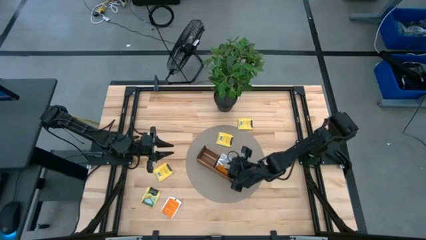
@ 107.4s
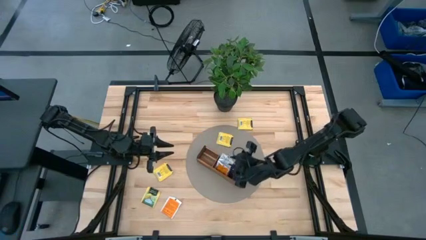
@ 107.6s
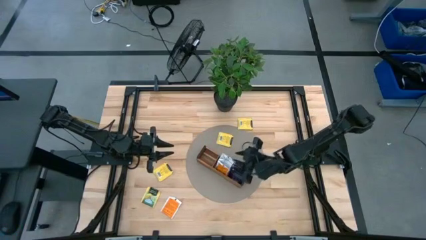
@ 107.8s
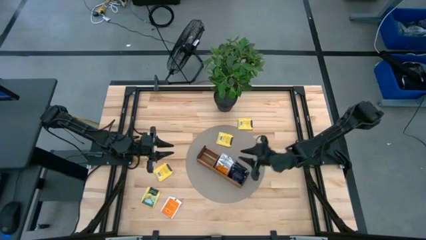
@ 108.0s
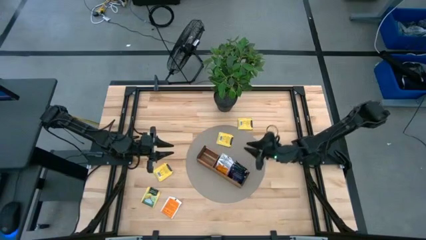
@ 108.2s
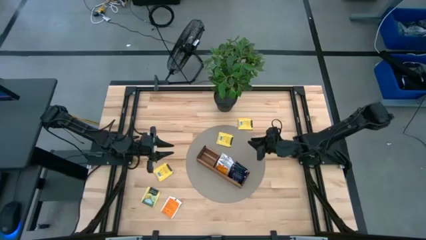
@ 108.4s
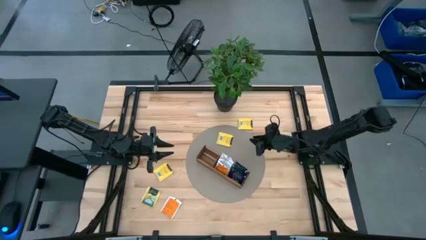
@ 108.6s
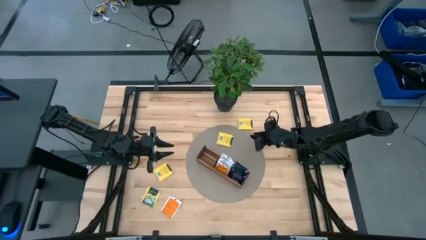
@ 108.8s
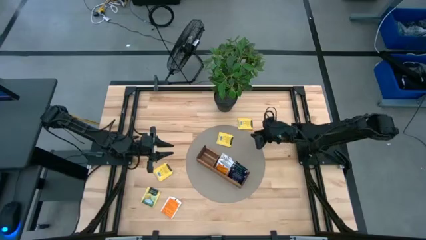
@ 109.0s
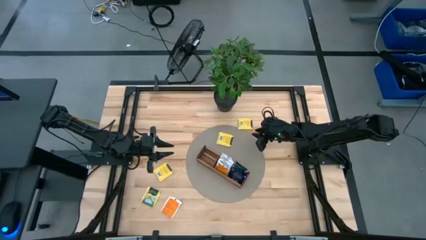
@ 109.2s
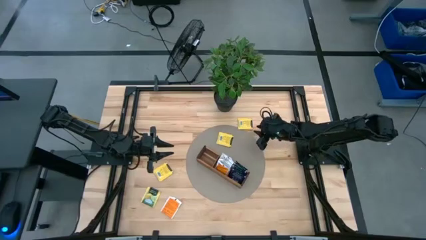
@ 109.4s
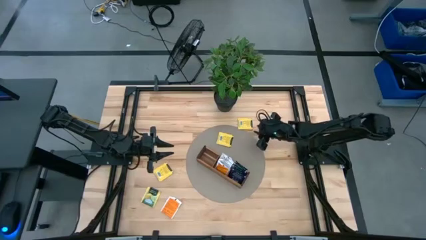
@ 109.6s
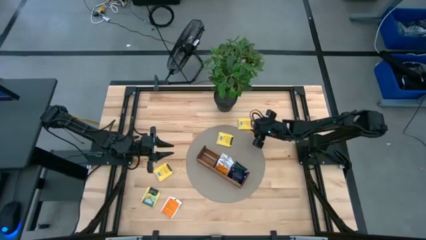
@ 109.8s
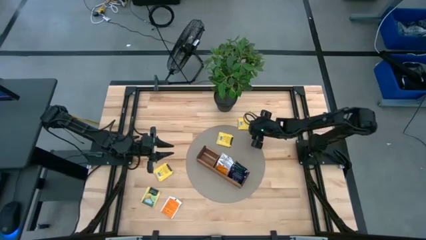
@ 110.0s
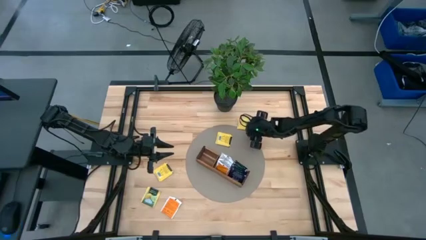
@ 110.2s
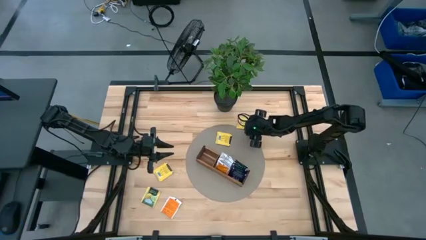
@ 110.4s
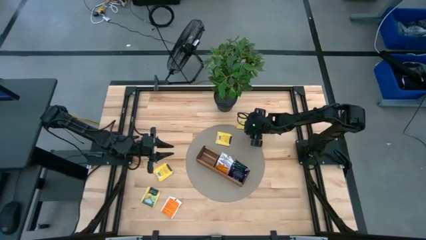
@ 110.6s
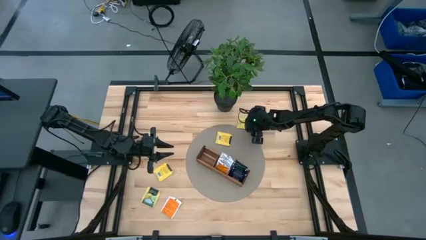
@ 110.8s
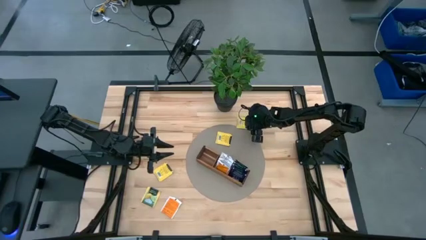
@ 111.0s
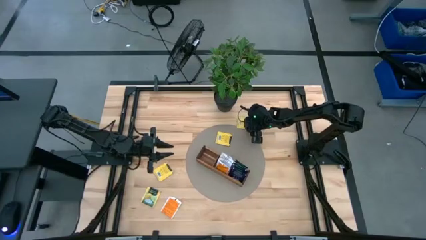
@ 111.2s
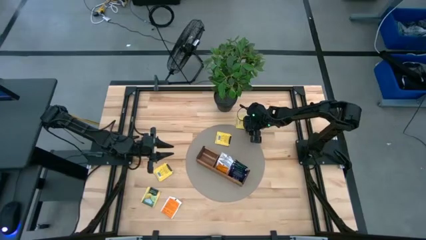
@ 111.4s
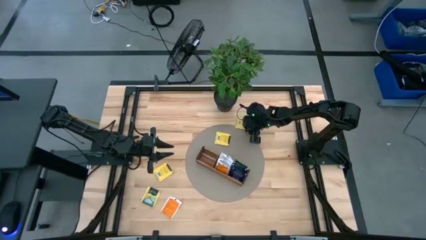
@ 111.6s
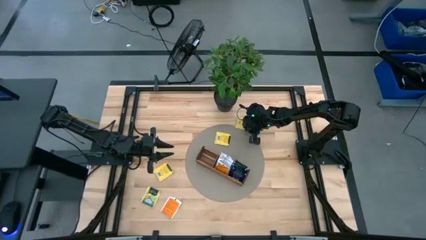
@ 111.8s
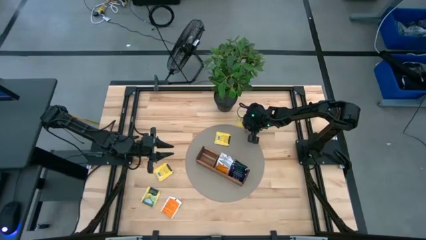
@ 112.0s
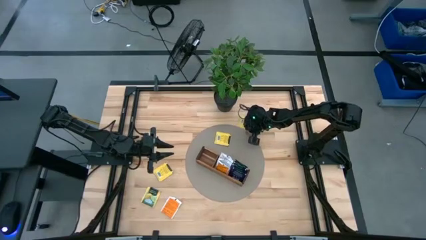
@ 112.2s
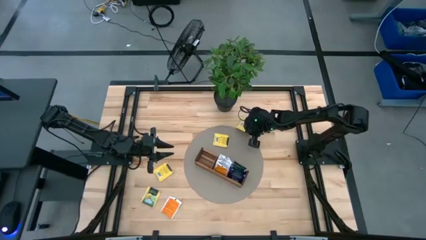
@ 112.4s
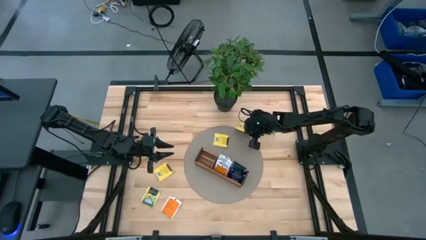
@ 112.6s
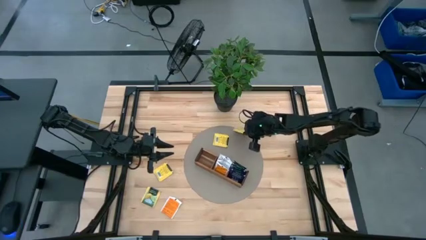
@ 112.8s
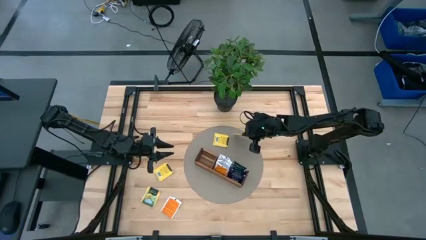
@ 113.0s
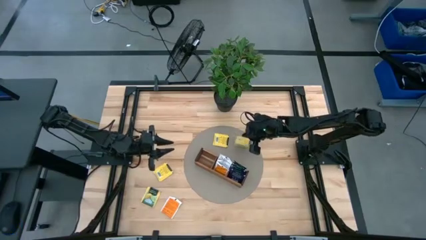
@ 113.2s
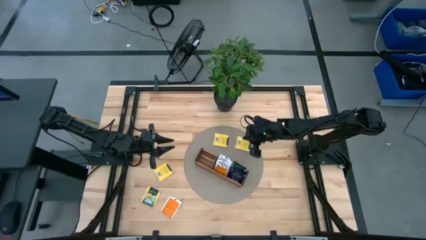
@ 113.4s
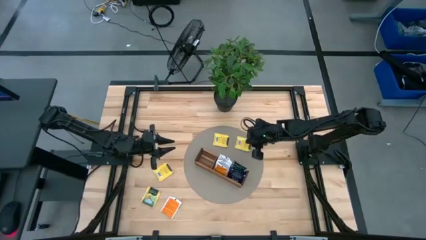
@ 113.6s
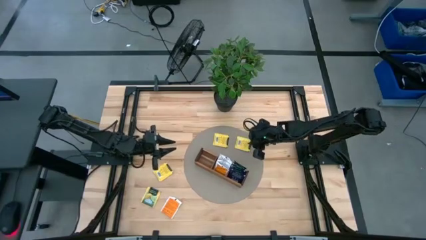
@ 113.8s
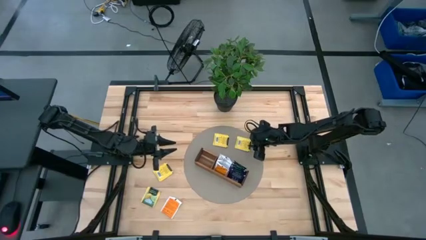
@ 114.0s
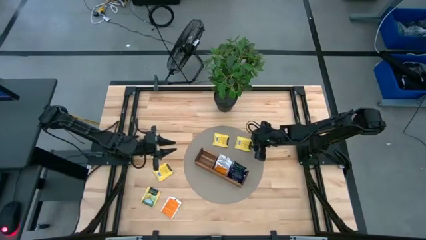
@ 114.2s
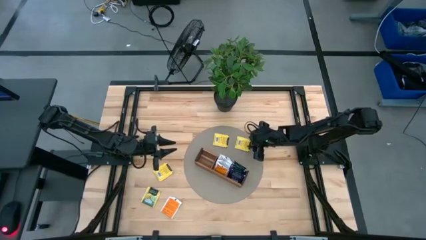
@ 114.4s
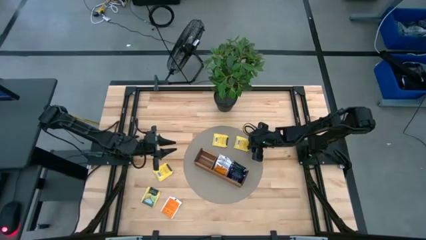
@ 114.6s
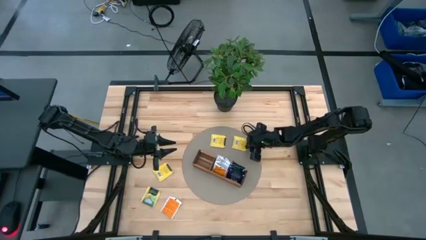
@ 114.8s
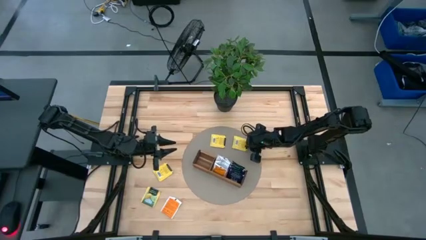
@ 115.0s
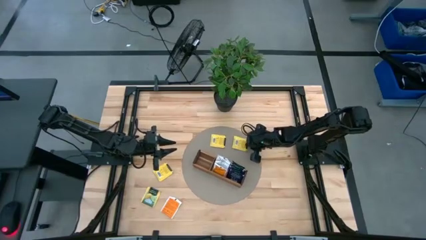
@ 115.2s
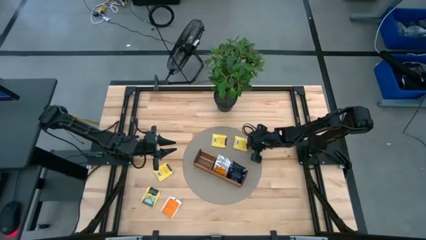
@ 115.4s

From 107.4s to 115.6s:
Task: Pick & Place Tea
Put the yellow tea bag into the left section of the wooden organizer

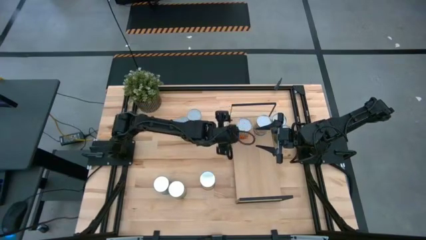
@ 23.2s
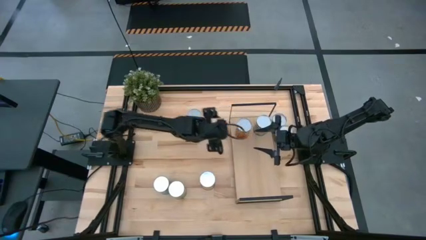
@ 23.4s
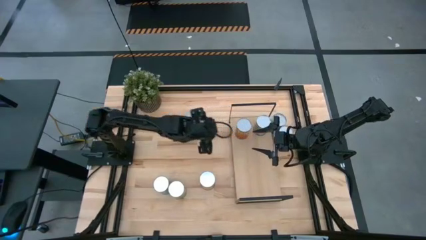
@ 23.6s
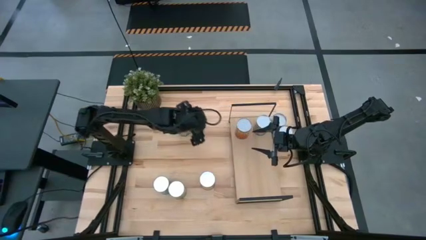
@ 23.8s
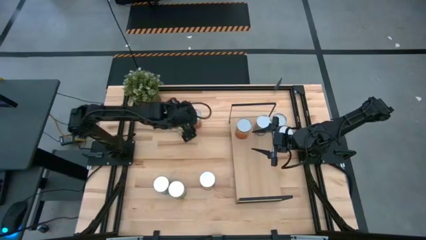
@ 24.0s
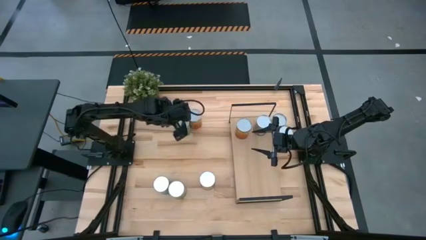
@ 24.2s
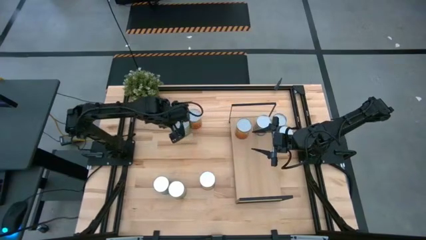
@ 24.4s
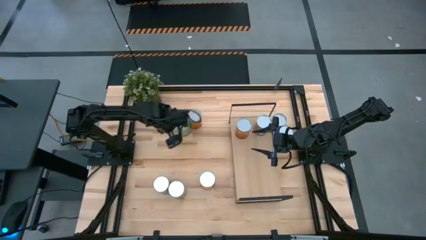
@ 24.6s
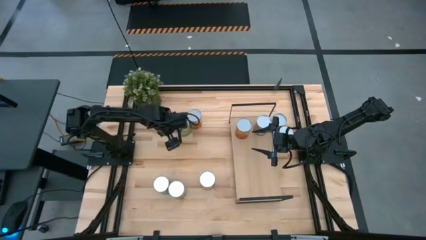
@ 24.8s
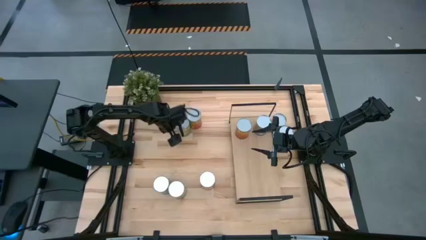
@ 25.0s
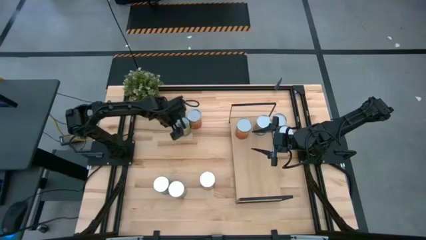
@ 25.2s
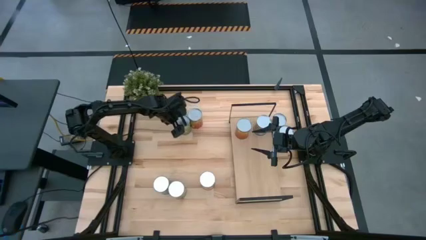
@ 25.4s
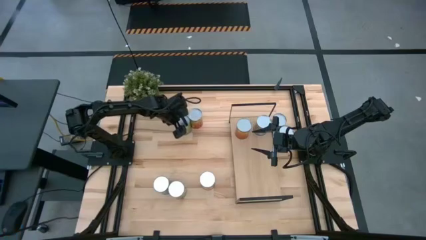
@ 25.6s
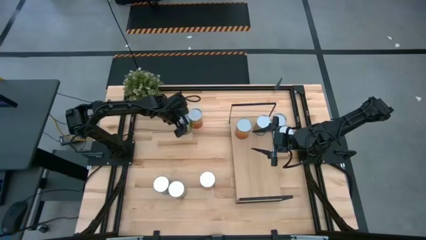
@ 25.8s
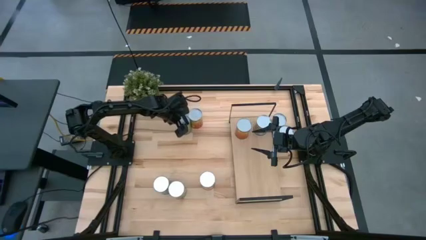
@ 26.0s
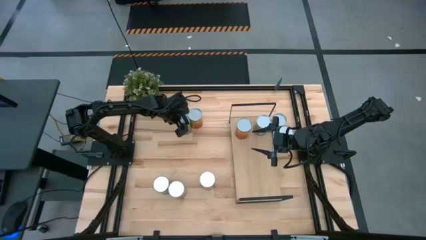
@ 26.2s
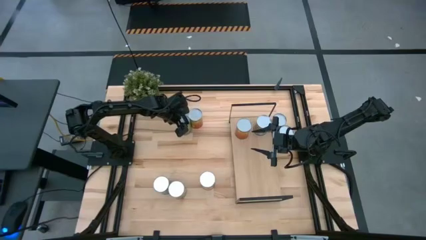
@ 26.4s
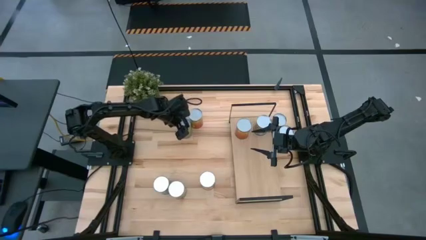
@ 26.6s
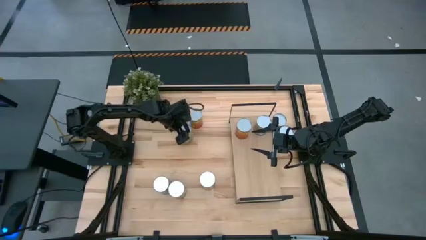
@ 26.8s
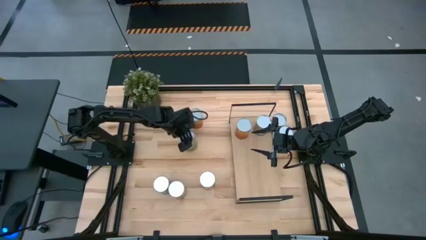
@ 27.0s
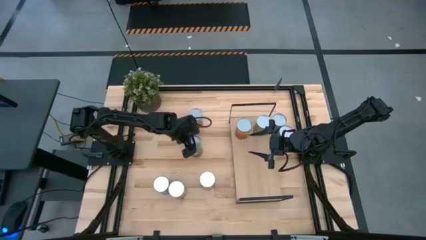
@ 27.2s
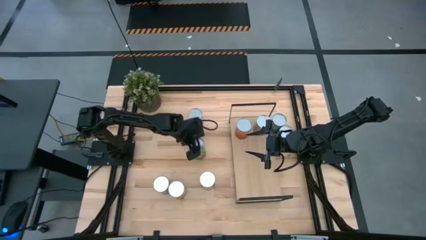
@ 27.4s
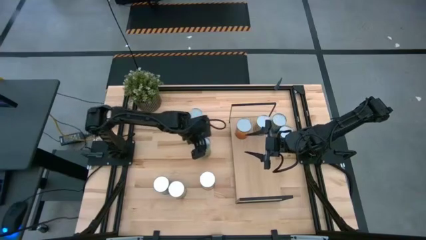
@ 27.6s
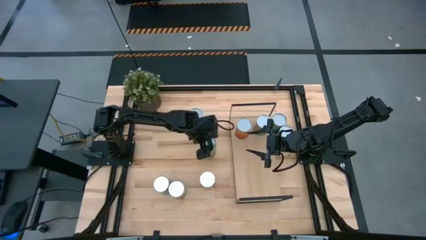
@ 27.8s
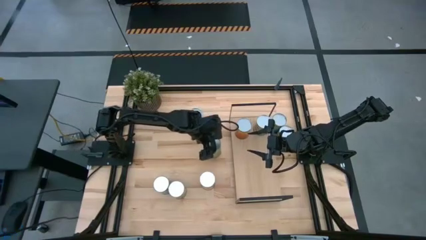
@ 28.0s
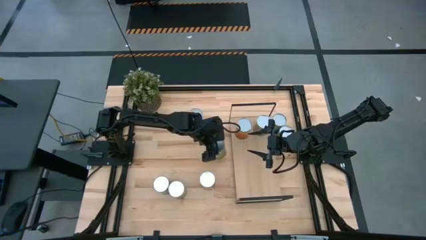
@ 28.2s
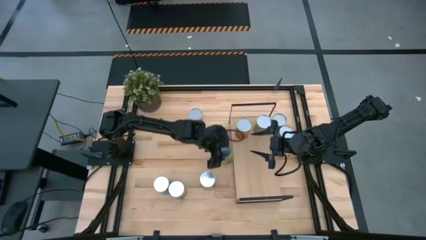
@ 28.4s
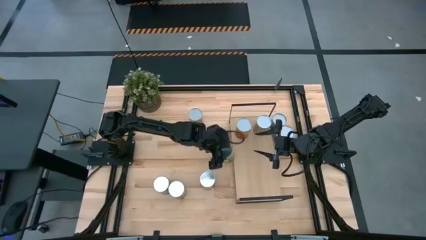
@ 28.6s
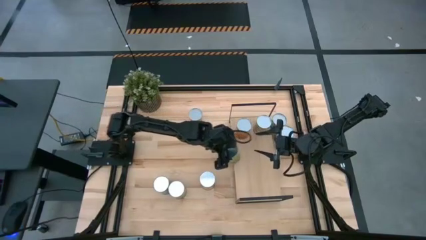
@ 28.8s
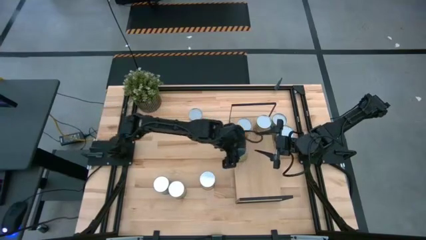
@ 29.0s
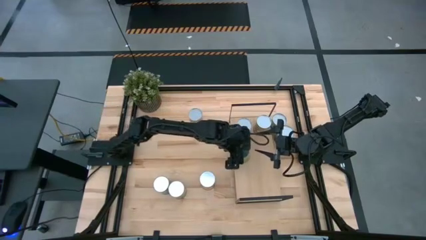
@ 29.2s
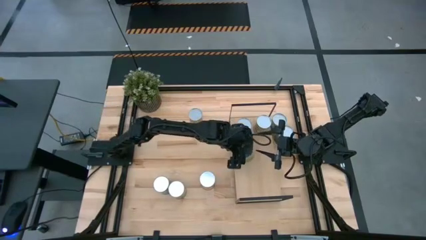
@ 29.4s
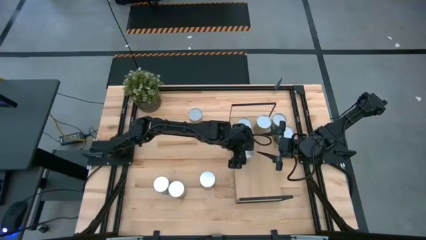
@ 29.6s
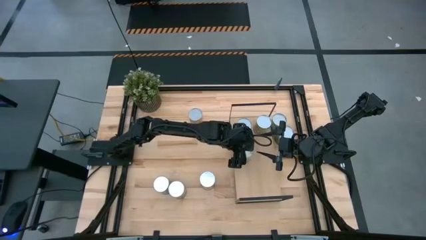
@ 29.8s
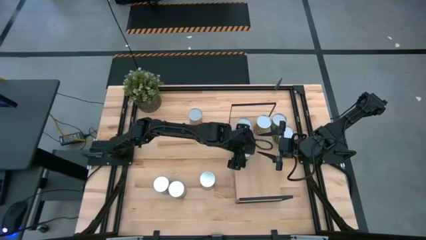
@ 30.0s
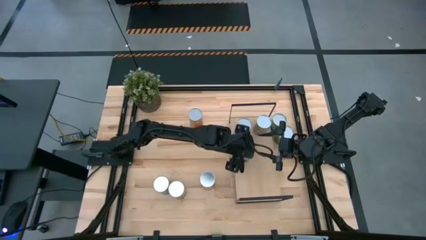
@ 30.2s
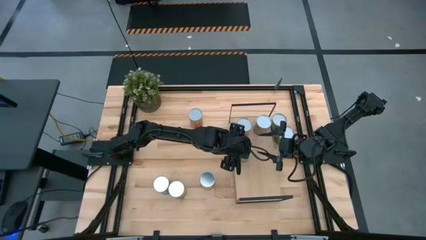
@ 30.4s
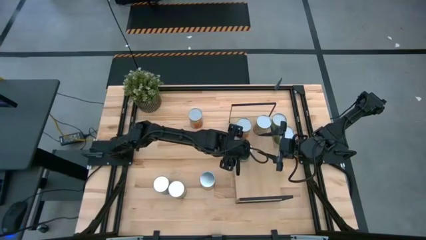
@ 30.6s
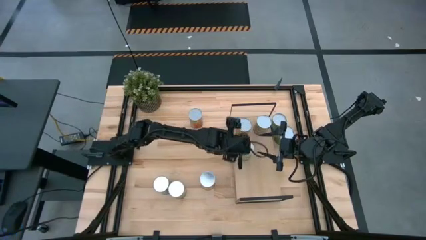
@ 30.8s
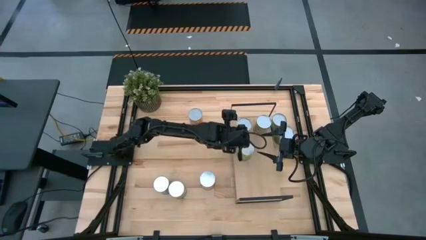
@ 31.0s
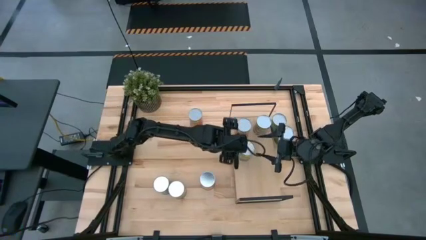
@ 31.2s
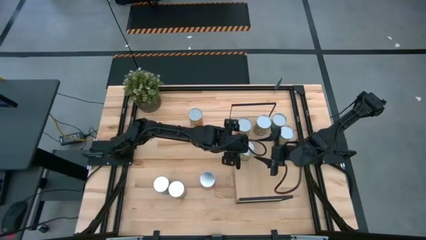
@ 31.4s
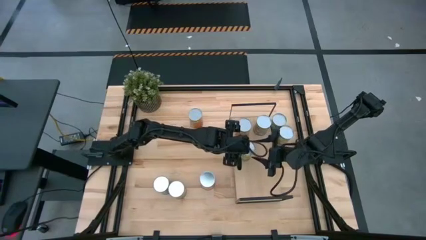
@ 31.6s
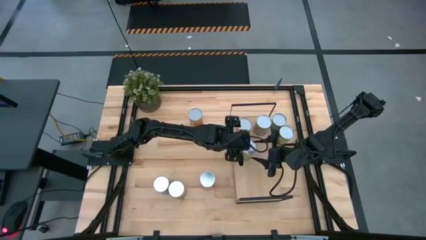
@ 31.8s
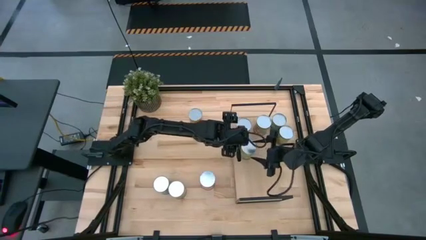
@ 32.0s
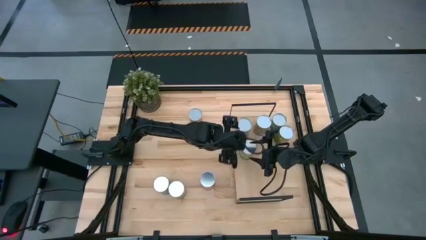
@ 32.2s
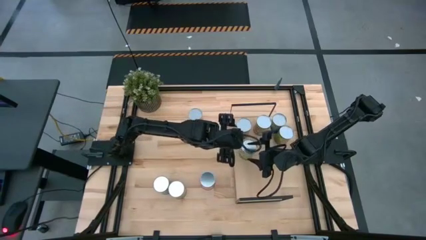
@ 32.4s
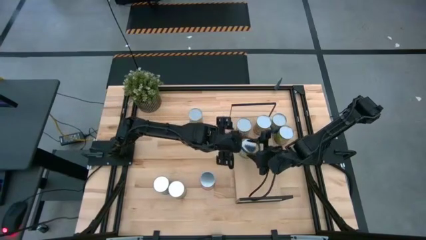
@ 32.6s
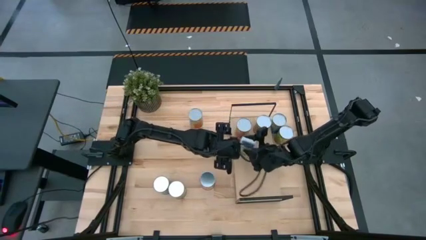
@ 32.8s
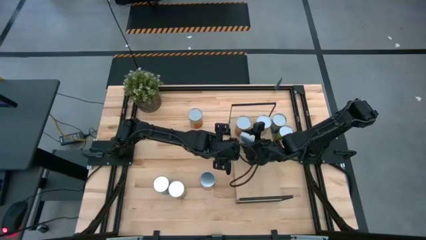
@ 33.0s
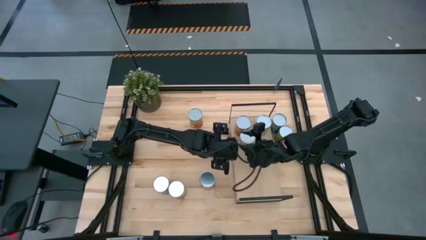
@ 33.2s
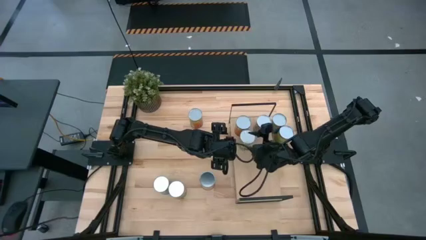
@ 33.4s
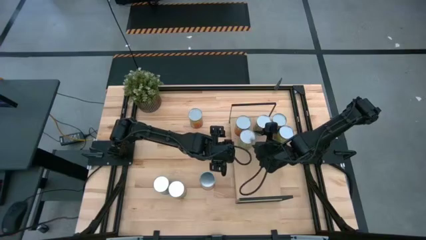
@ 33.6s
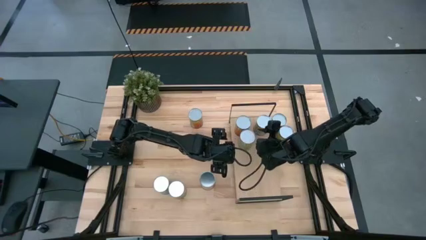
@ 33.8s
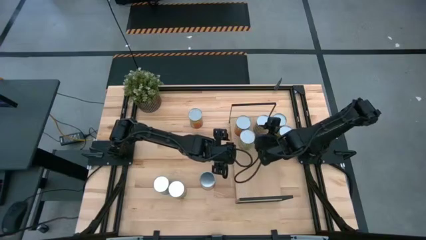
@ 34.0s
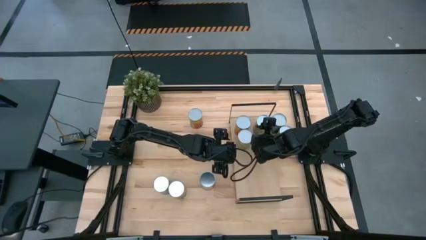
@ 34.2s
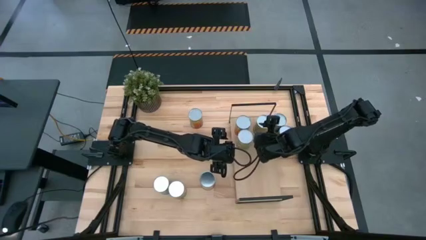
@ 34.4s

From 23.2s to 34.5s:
Task: Pick and place cans onto a shelf
Put the canned pears on the shelf
